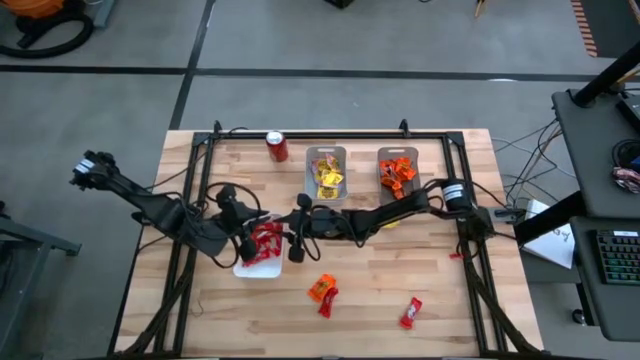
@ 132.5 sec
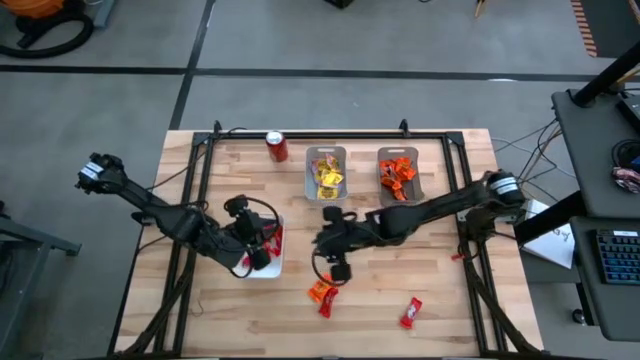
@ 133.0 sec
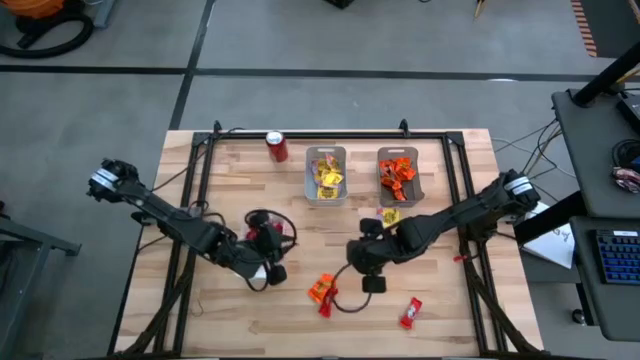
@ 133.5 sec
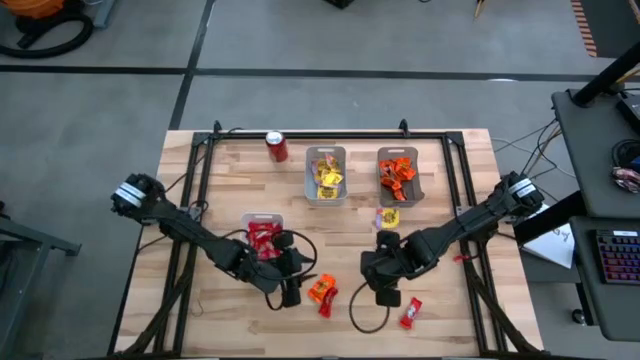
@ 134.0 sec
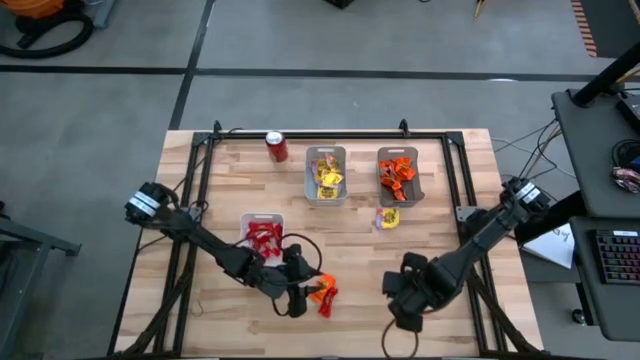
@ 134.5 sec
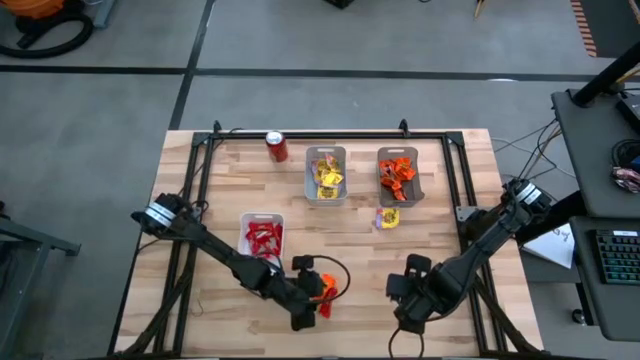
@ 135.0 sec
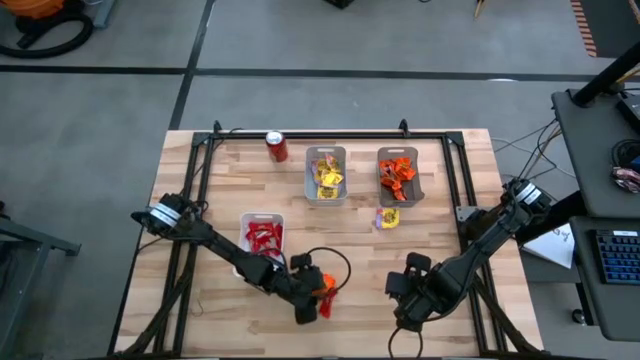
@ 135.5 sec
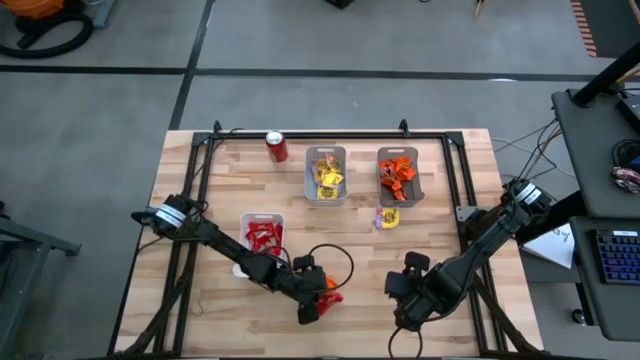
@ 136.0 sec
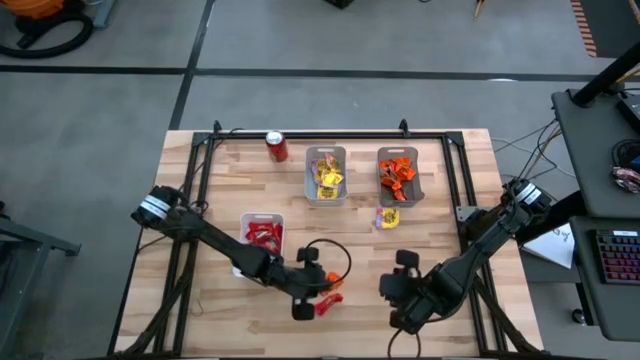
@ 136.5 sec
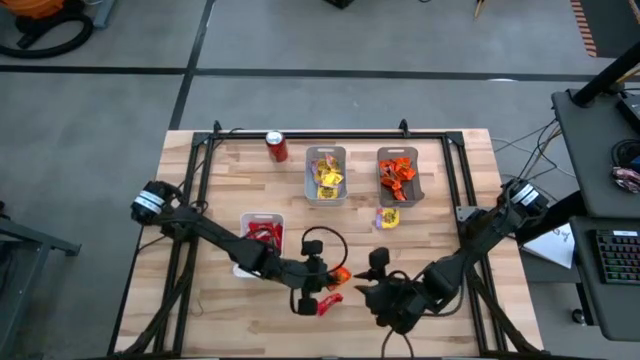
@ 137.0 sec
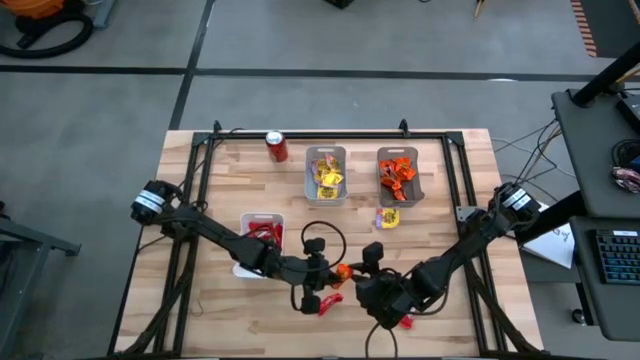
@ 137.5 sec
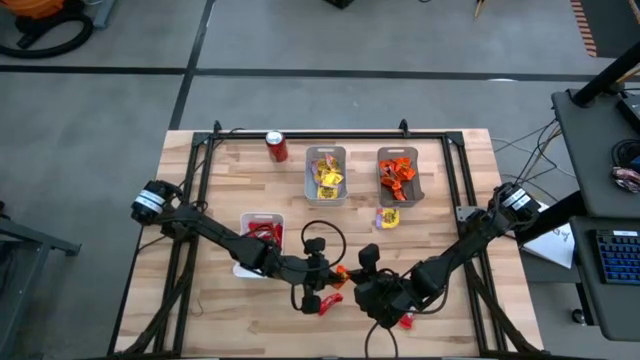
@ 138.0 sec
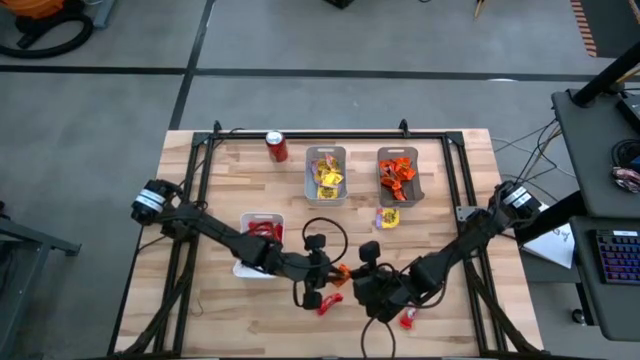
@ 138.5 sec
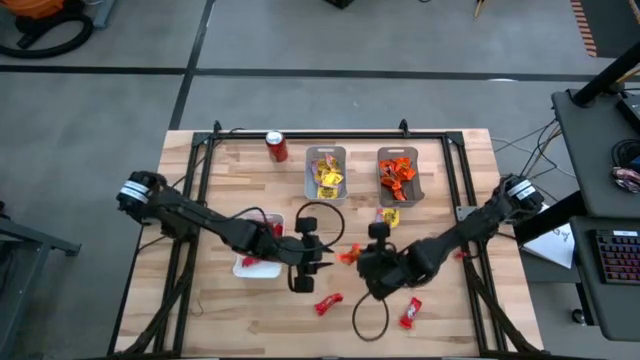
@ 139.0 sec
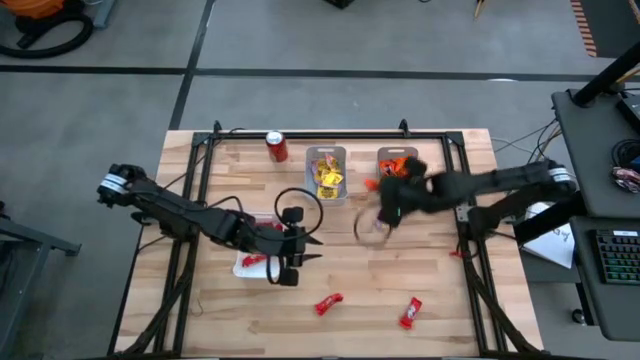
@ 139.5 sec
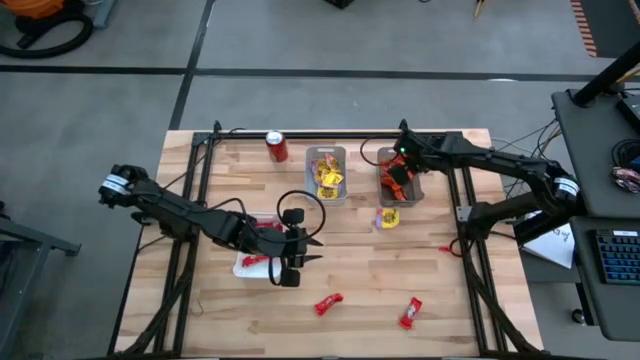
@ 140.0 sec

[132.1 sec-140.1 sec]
Task: Sort candy
Put the orange candy into the black bin

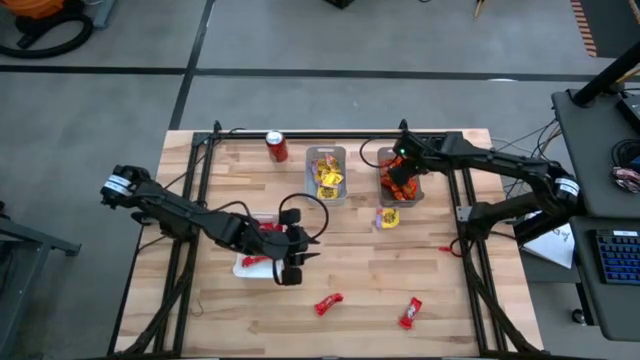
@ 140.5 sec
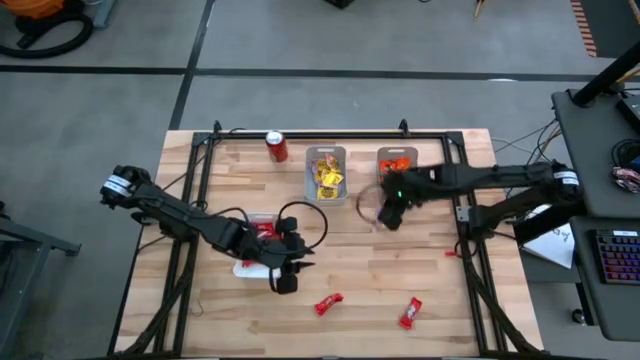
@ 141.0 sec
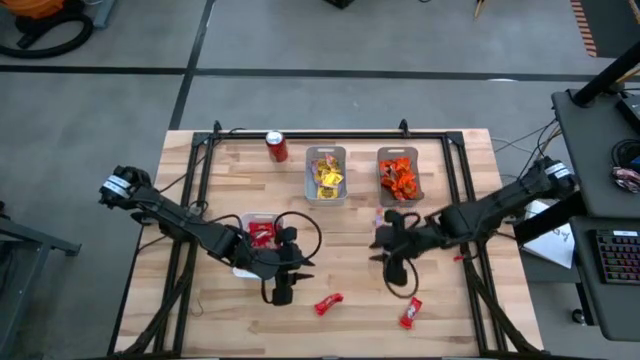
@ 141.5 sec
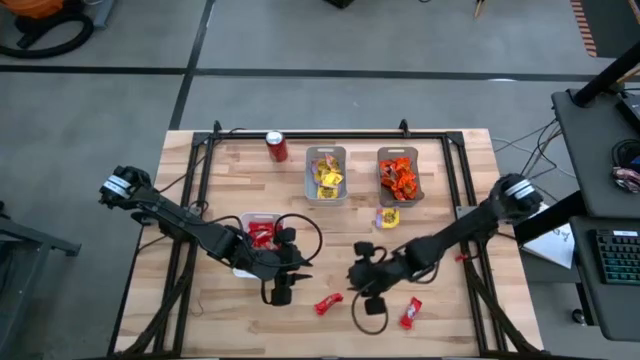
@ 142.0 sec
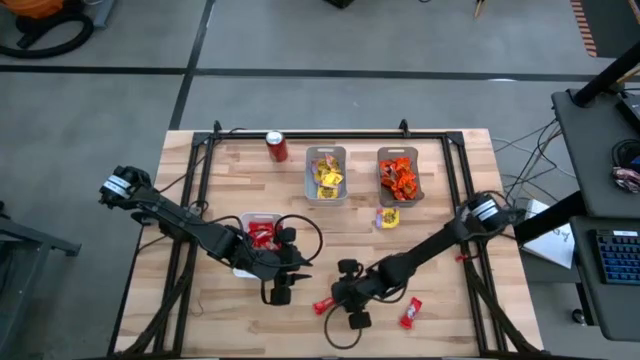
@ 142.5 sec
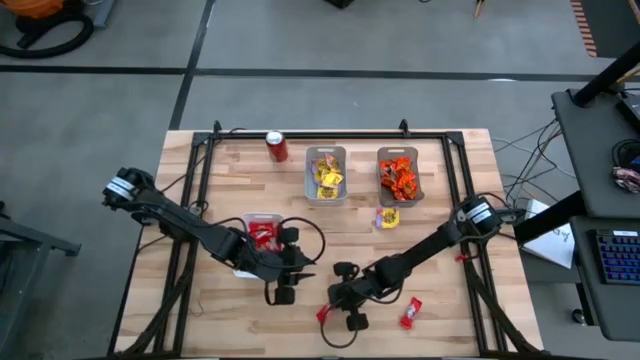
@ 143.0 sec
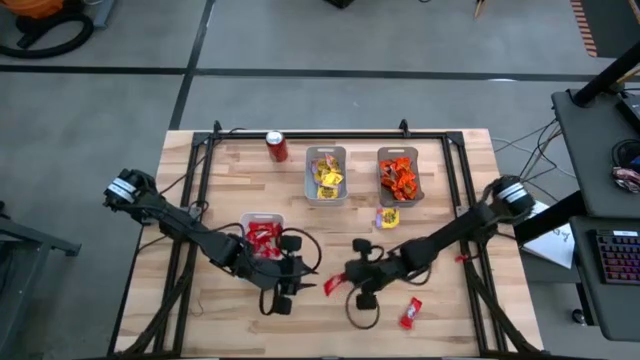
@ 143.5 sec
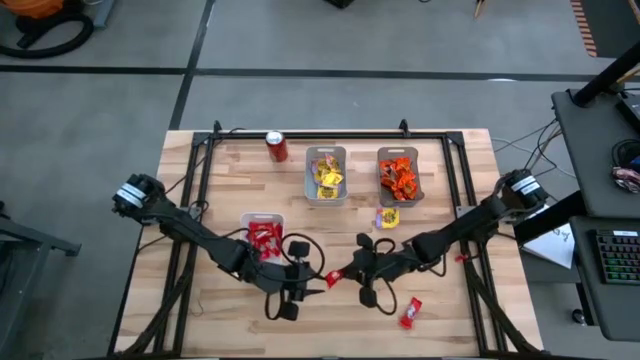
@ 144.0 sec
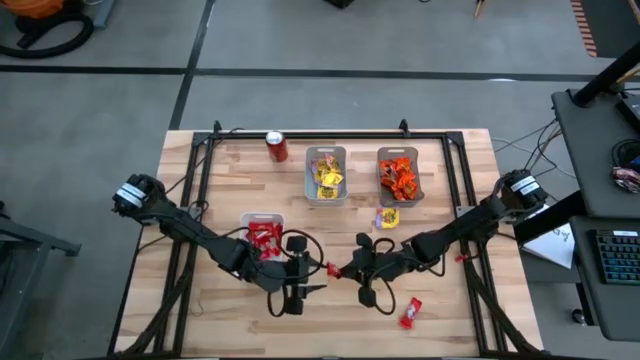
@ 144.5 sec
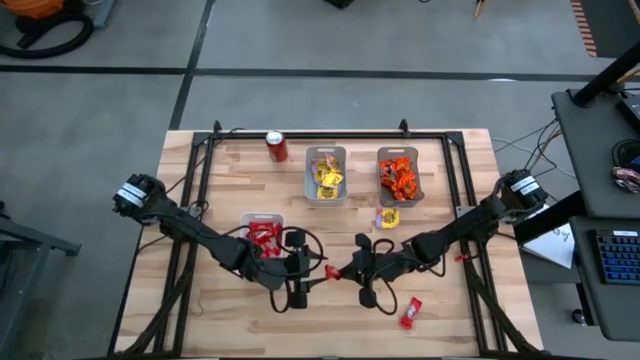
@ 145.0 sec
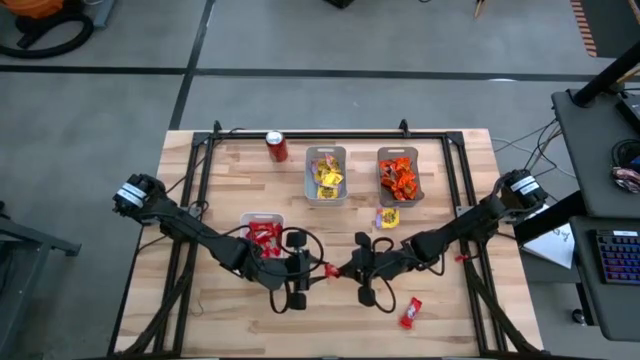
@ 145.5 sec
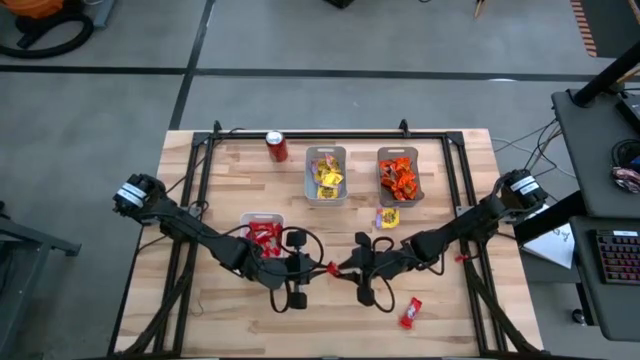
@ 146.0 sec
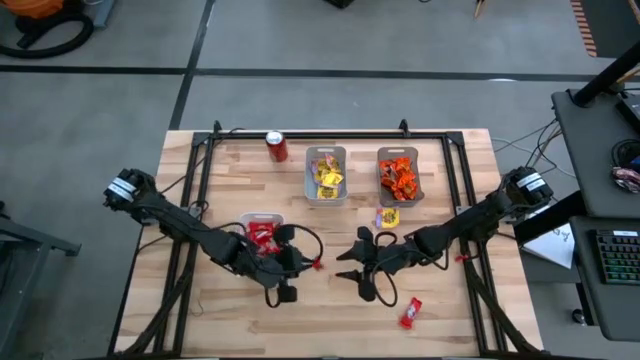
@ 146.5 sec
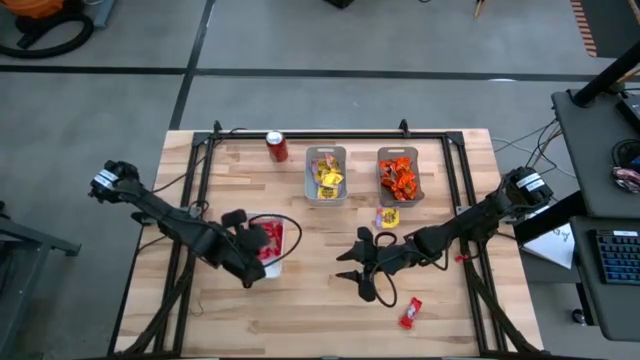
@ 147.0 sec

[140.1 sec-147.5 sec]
Put the red candy into the white bin

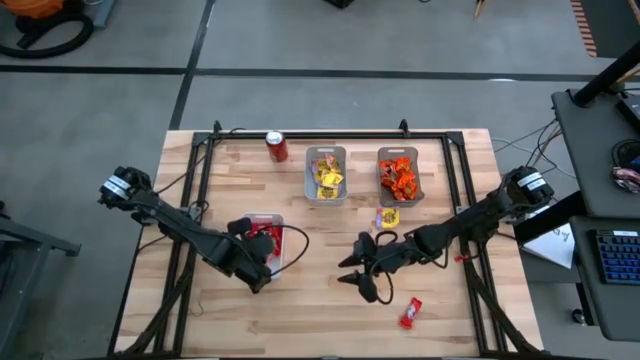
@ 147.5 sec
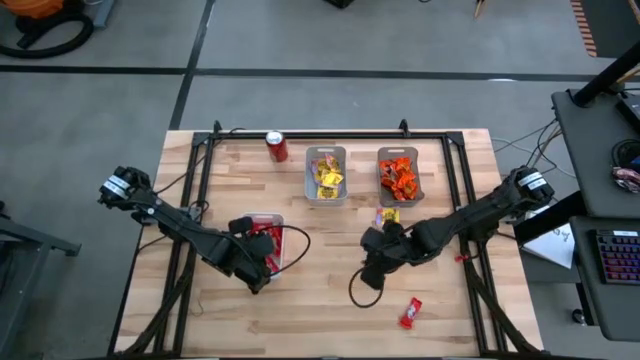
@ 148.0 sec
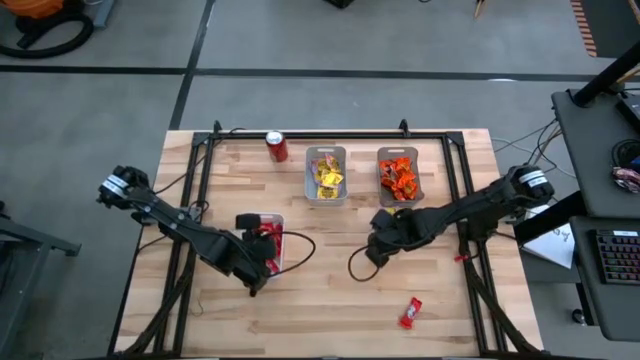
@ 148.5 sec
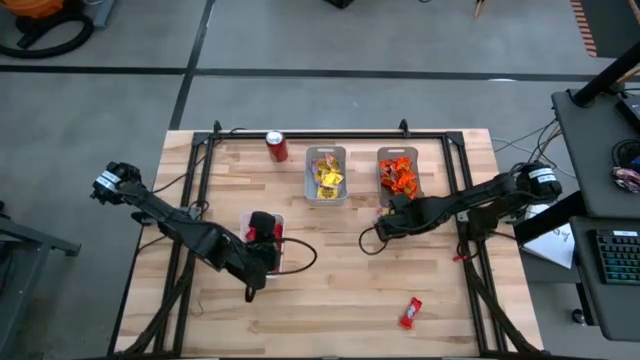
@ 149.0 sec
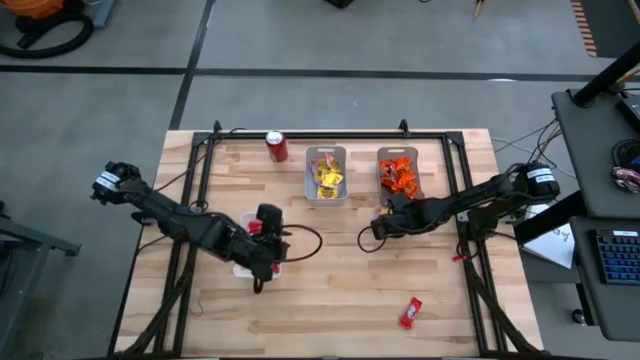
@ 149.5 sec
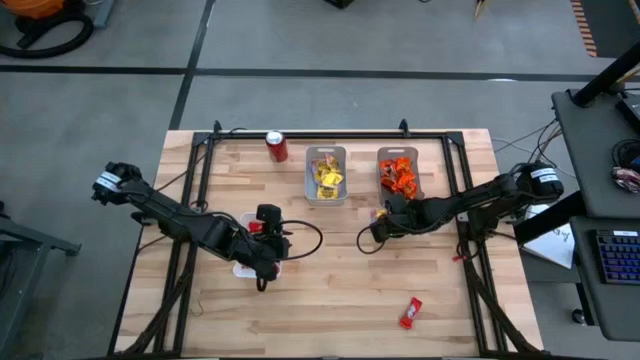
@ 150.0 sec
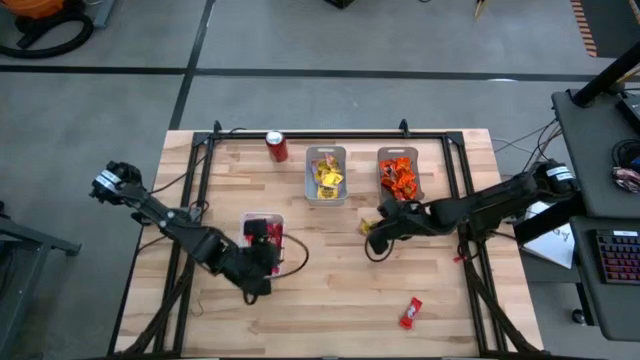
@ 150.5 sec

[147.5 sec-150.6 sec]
Put the yellow candy into the gray bin

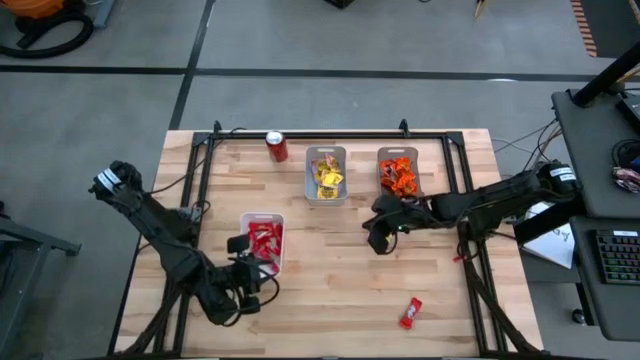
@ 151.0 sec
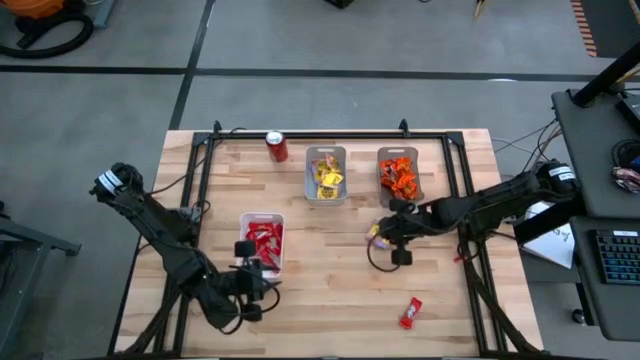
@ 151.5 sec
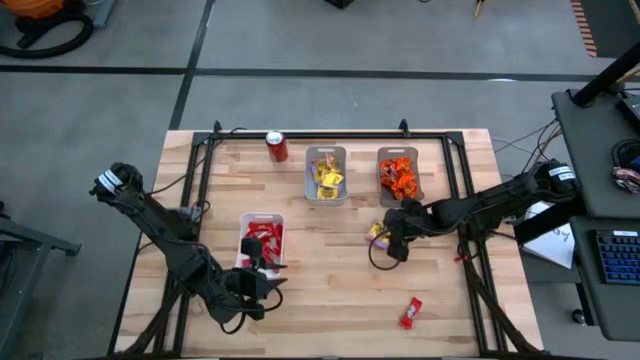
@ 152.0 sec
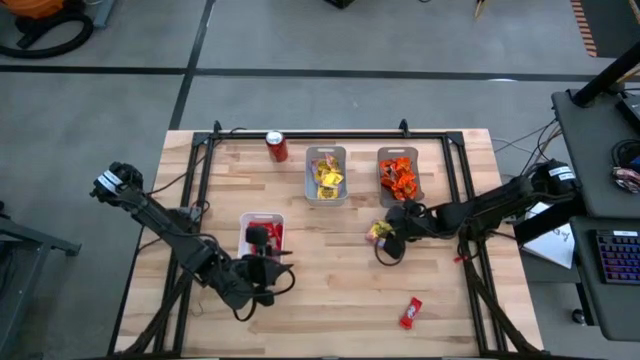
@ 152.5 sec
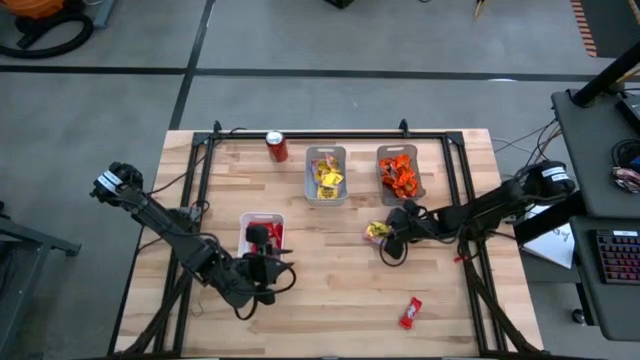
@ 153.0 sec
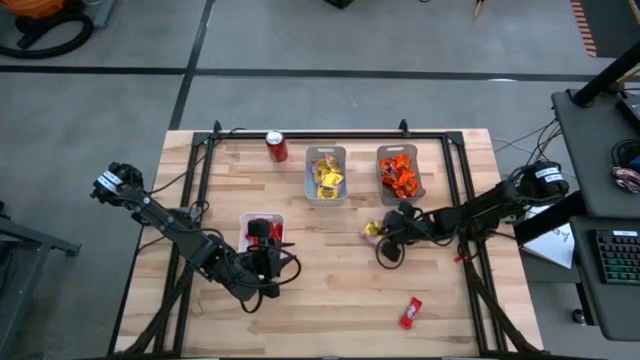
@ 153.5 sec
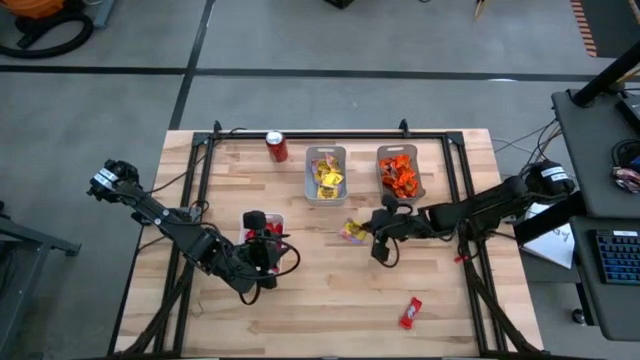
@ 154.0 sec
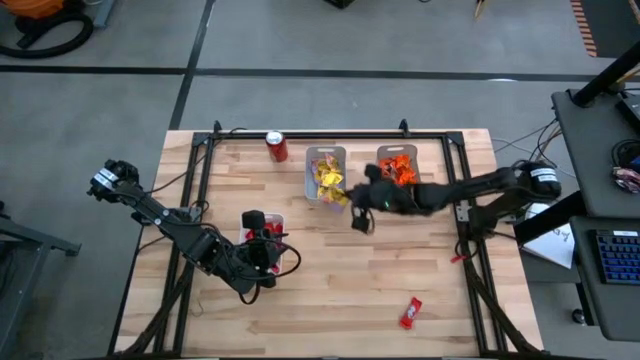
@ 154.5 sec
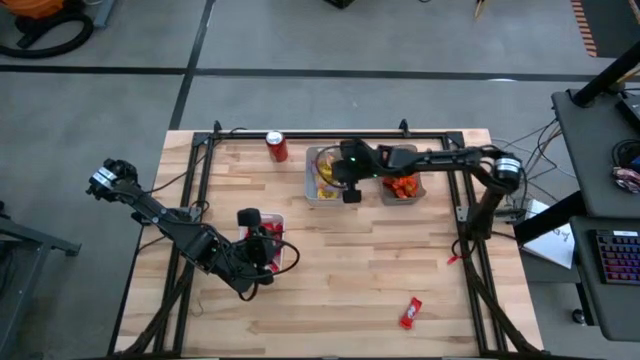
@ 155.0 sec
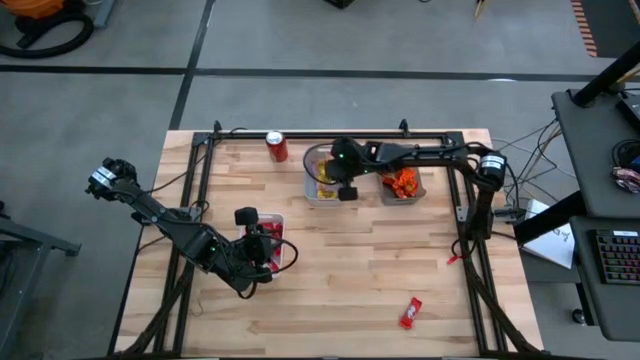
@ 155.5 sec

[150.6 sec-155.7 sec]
Put the yellow candy into the gray bin
